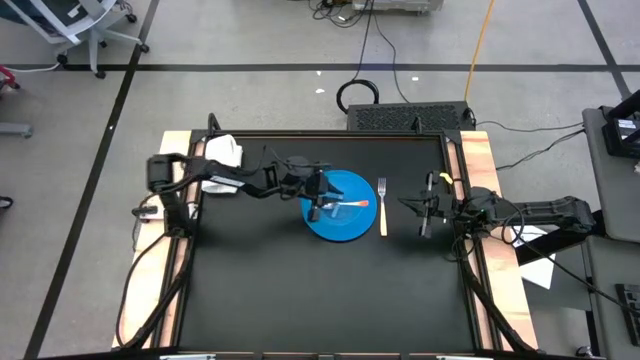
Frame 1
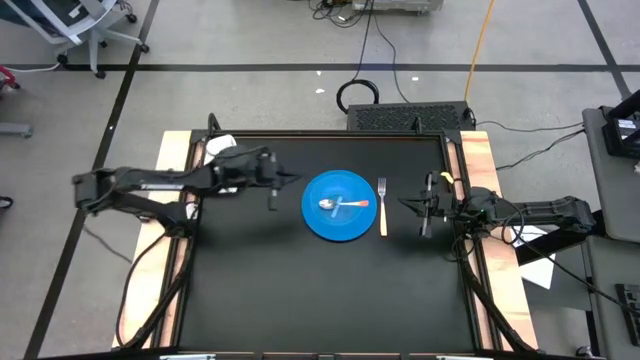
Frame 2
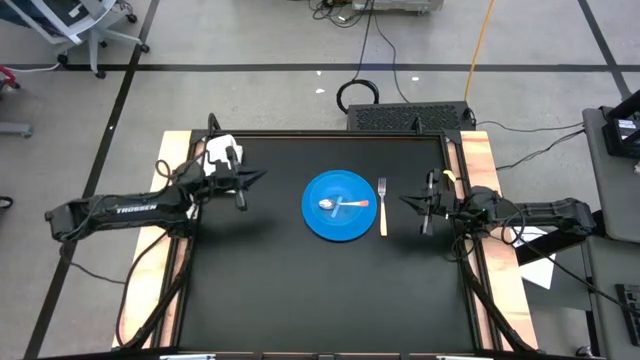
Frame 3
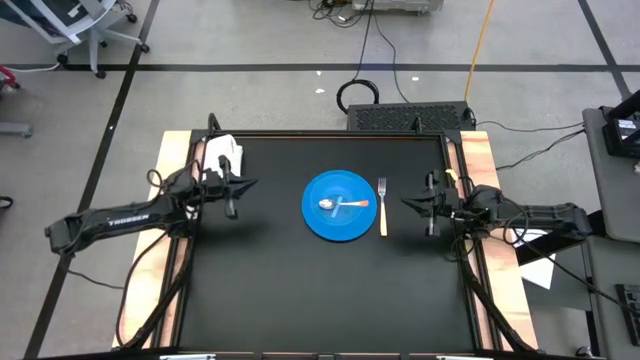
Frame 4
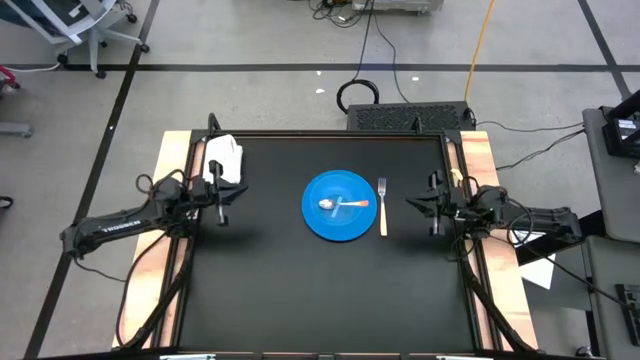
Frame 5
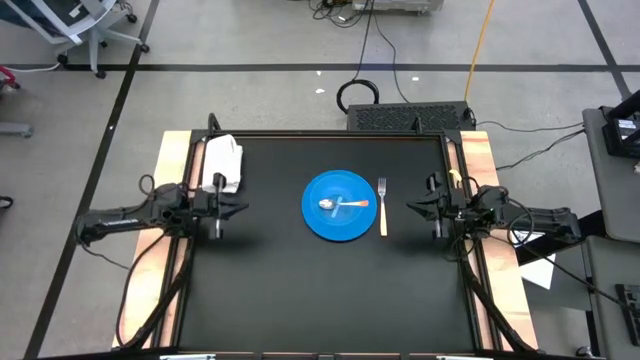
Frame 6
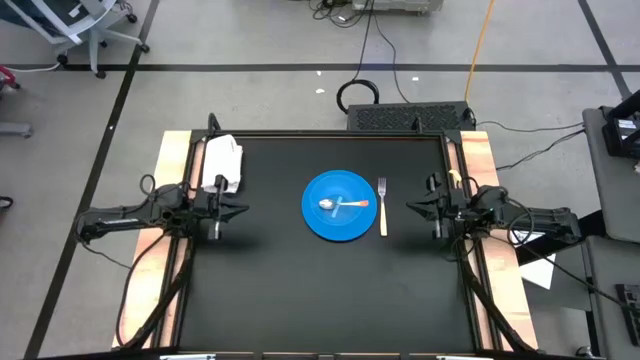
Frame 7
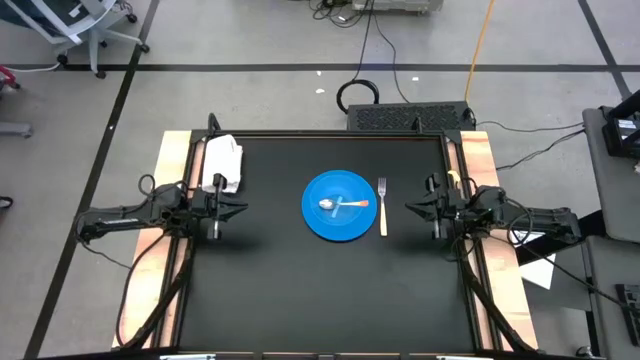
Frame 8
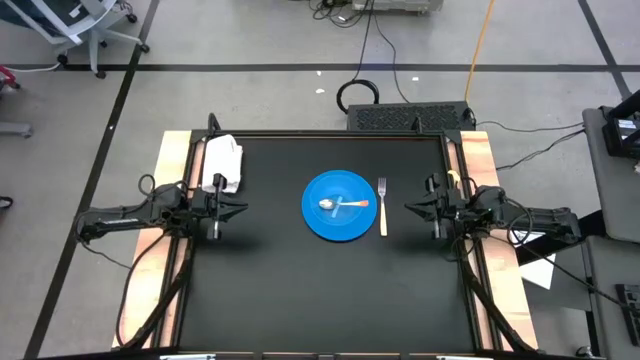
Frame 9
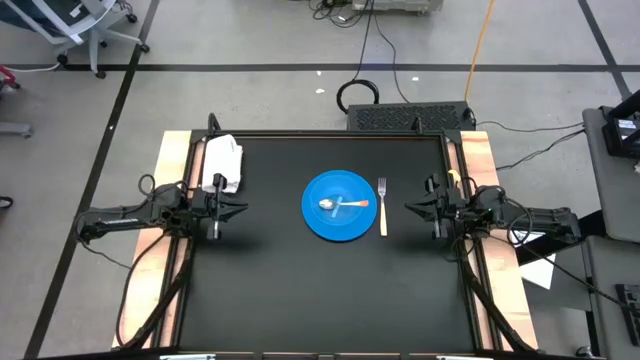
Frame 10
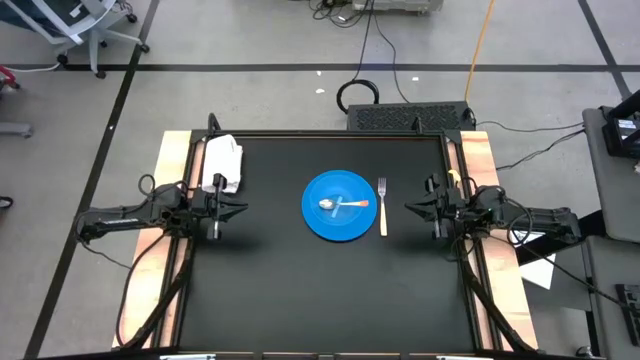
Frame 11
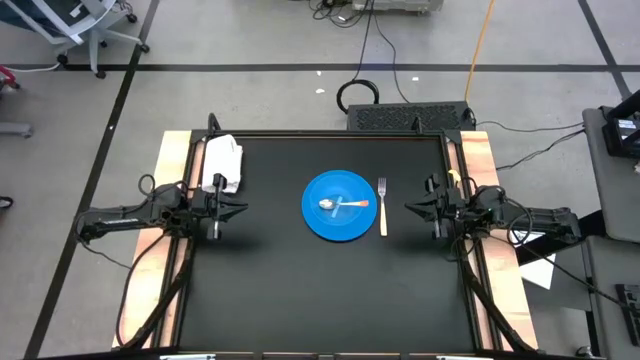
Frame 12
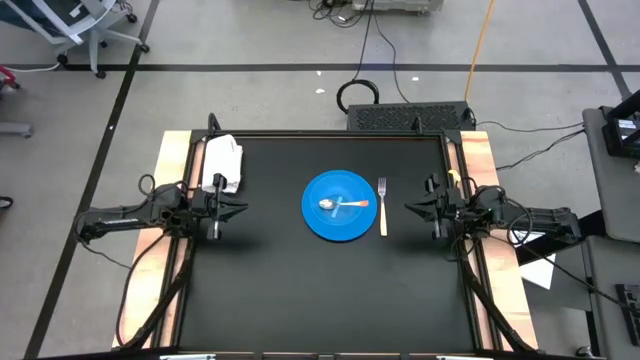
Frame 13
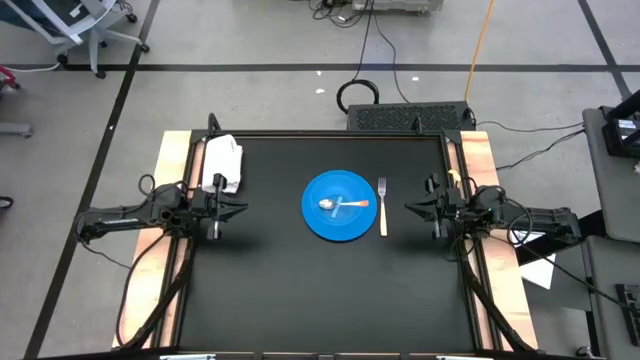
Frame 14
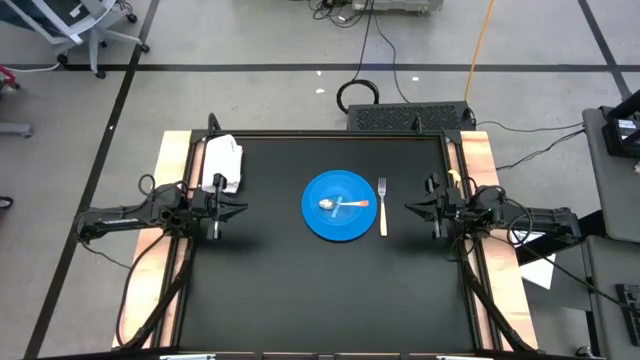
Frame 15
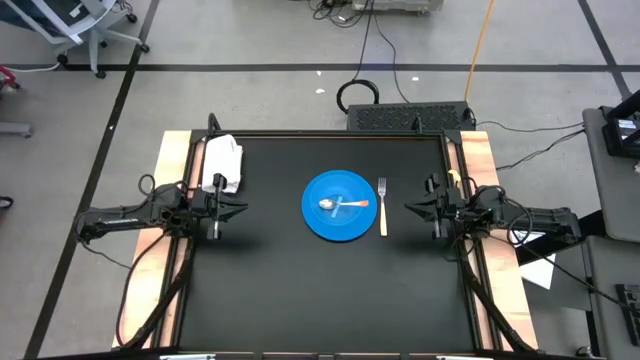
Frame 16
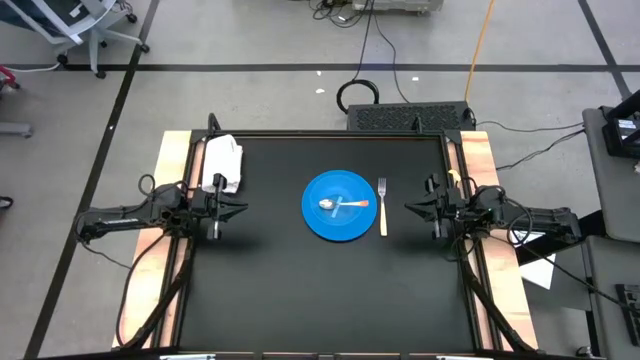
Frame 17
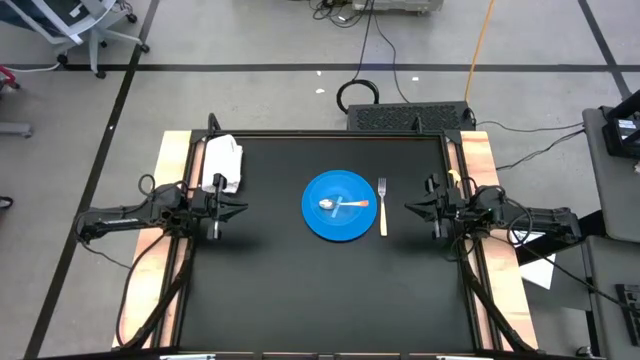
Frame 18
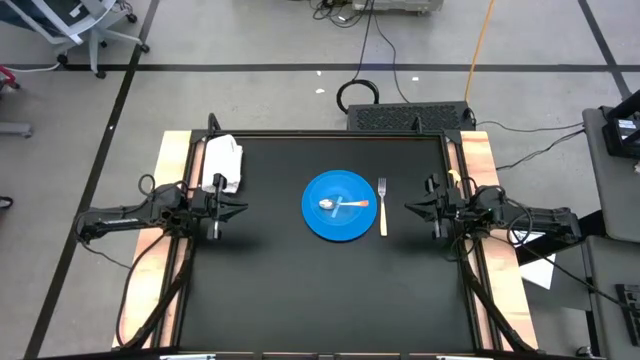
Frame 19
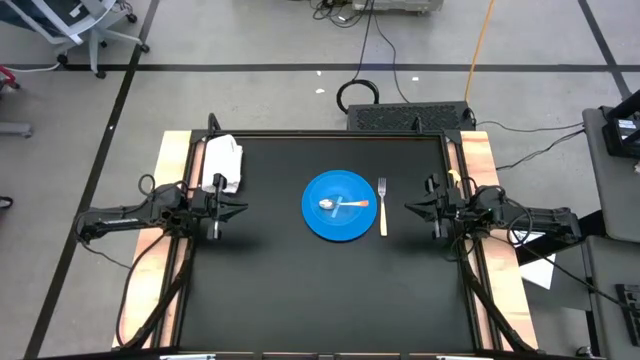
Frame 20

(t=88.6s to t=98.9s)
Task: Set table place
Return to Home Position

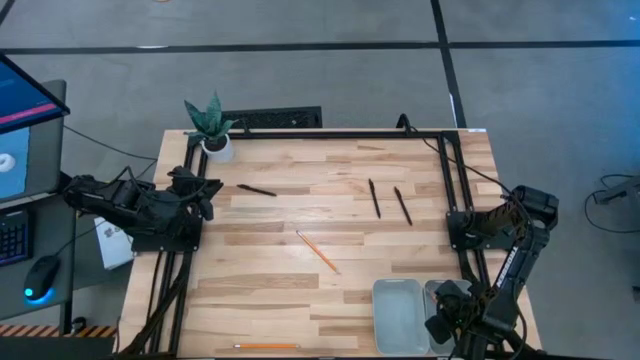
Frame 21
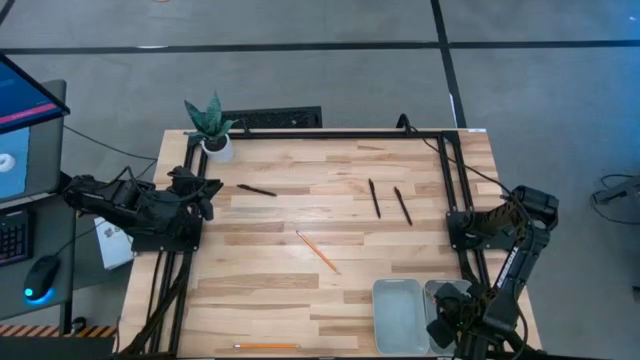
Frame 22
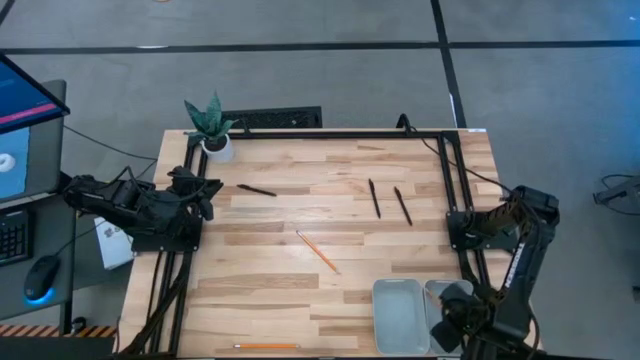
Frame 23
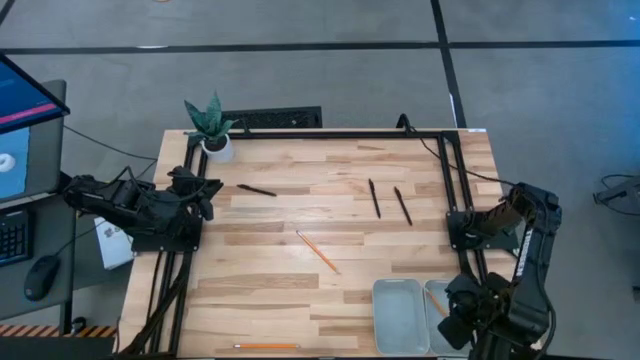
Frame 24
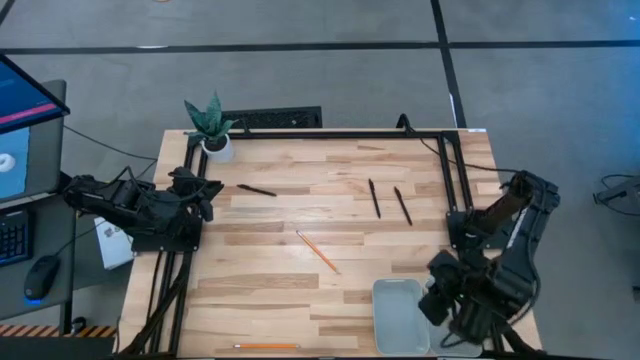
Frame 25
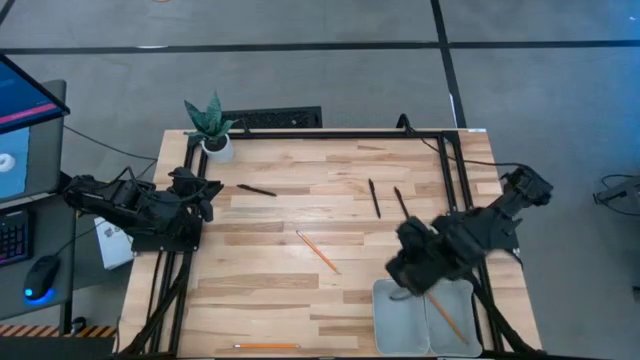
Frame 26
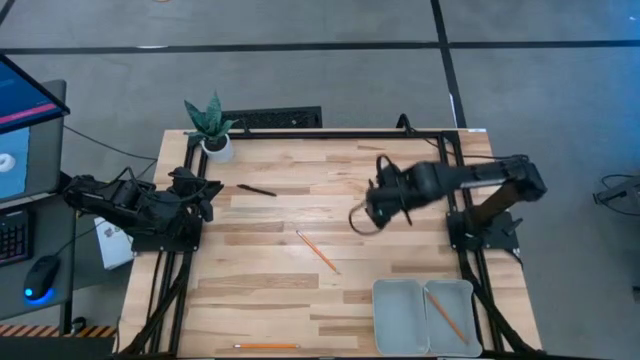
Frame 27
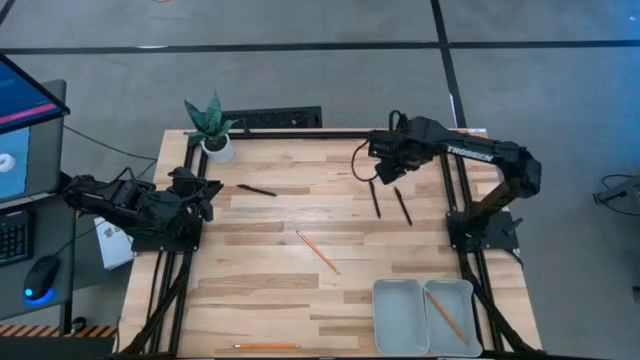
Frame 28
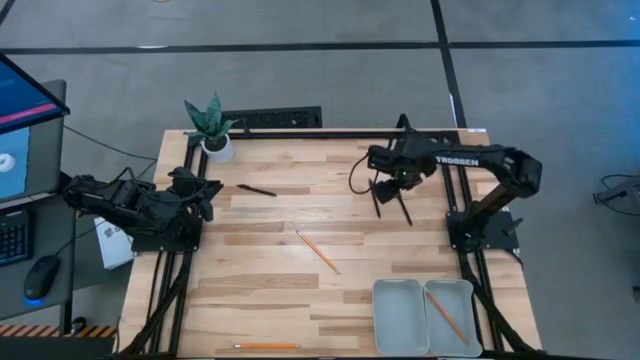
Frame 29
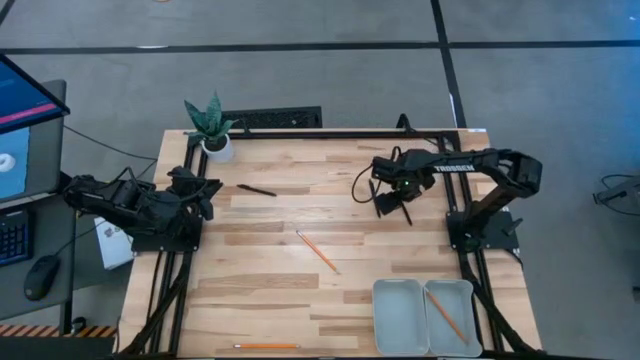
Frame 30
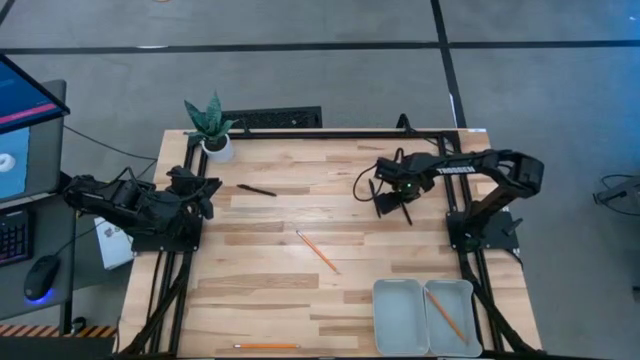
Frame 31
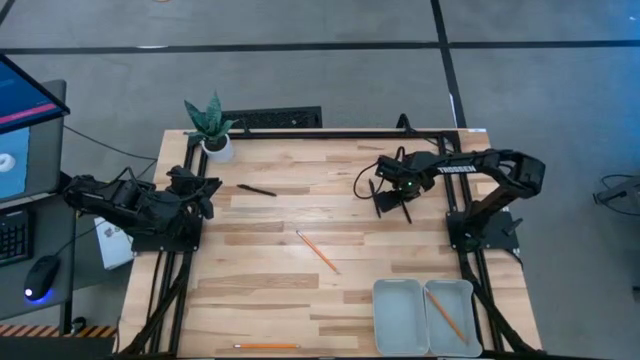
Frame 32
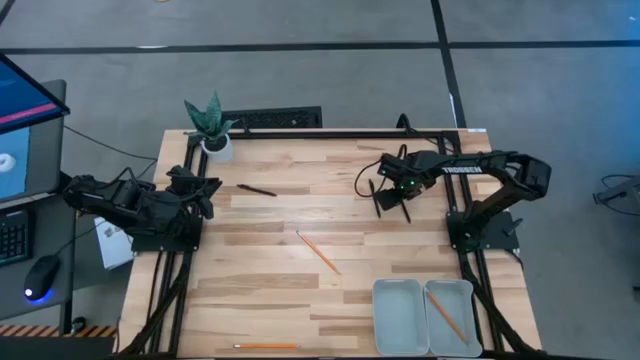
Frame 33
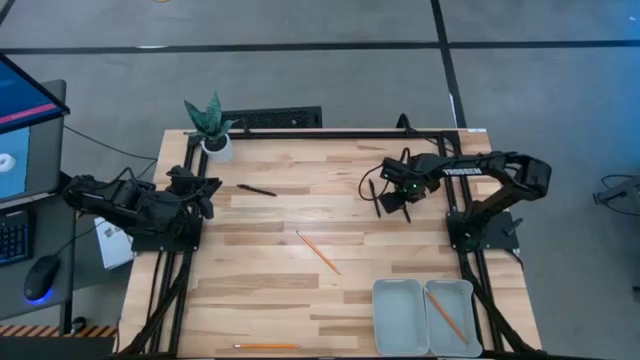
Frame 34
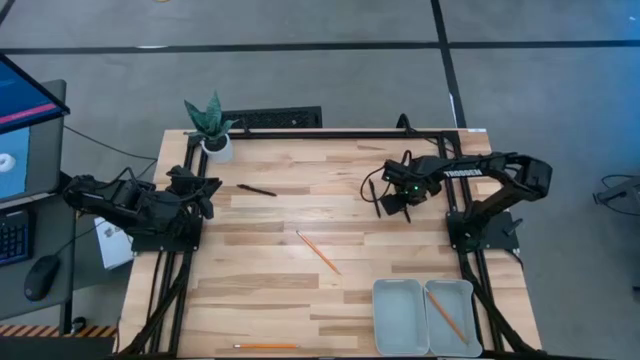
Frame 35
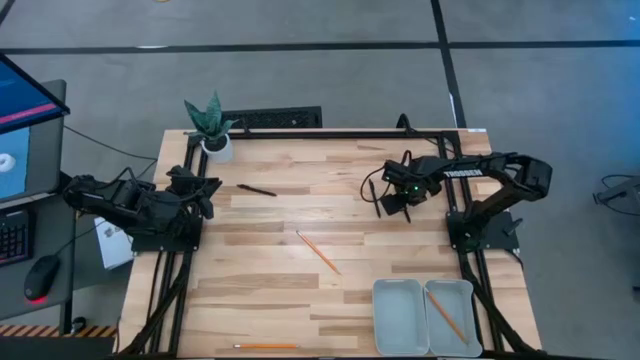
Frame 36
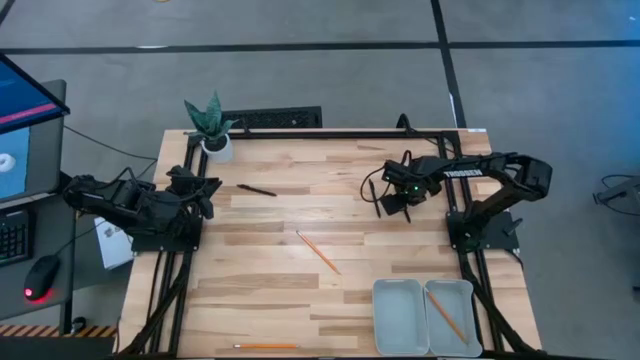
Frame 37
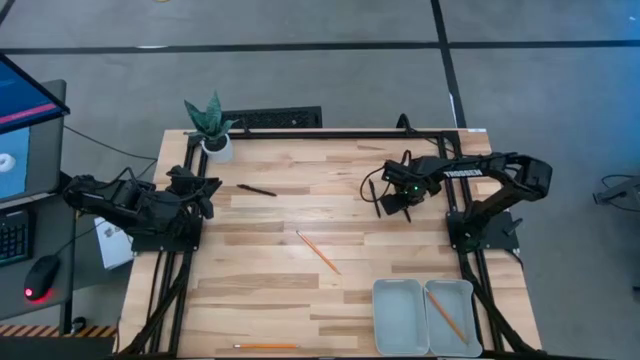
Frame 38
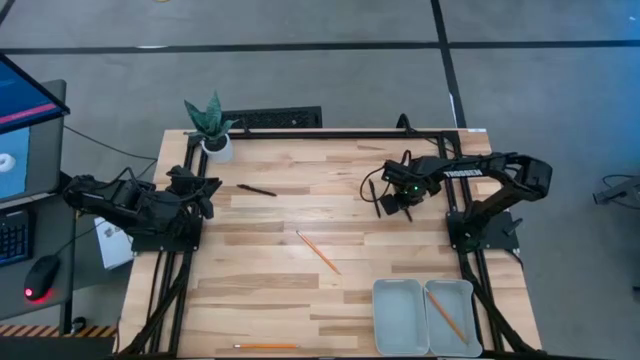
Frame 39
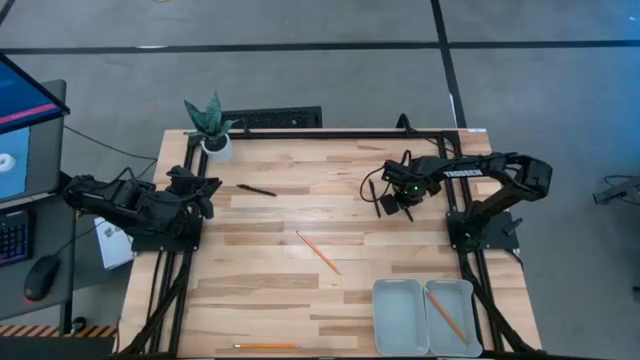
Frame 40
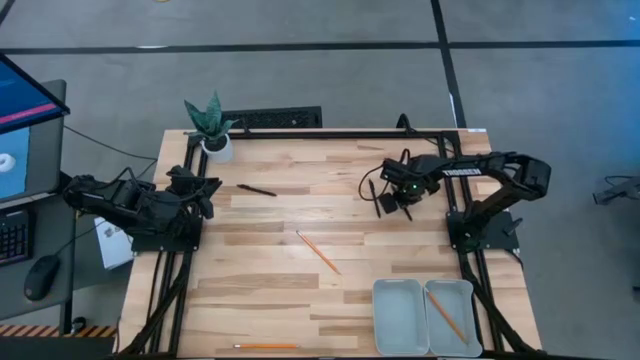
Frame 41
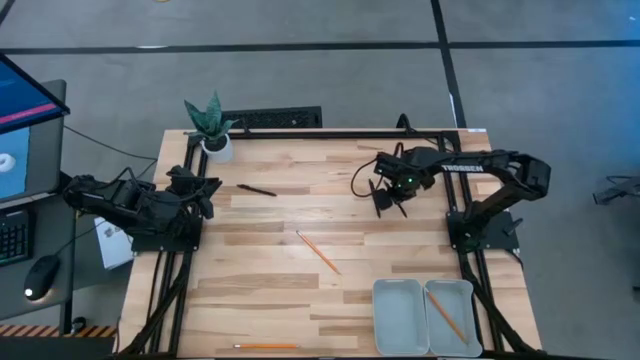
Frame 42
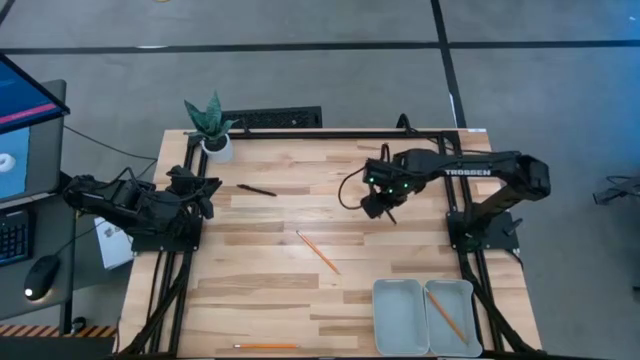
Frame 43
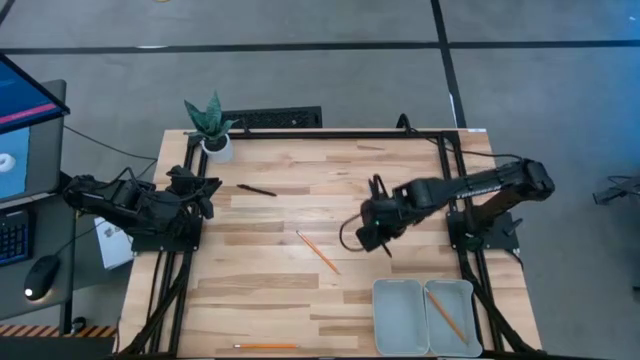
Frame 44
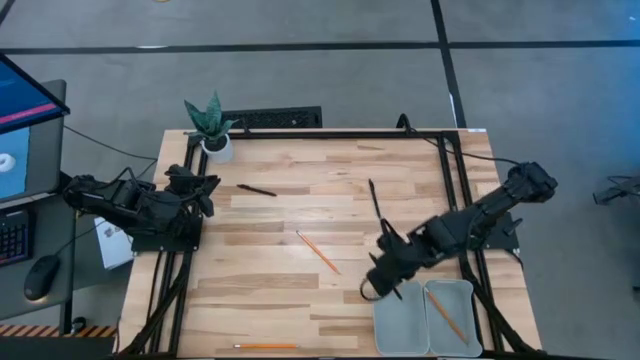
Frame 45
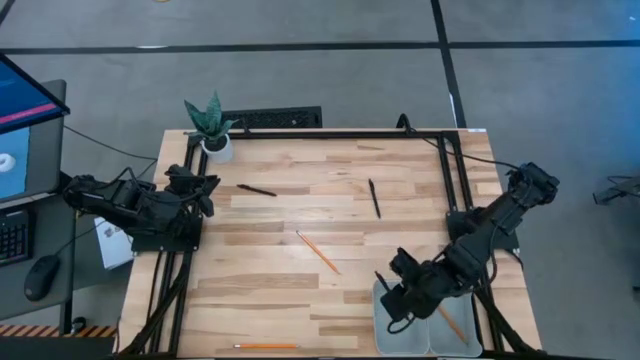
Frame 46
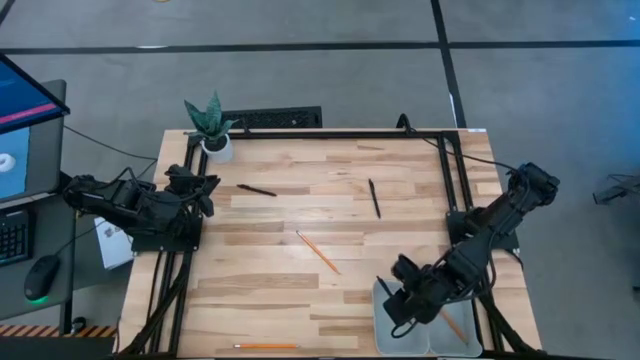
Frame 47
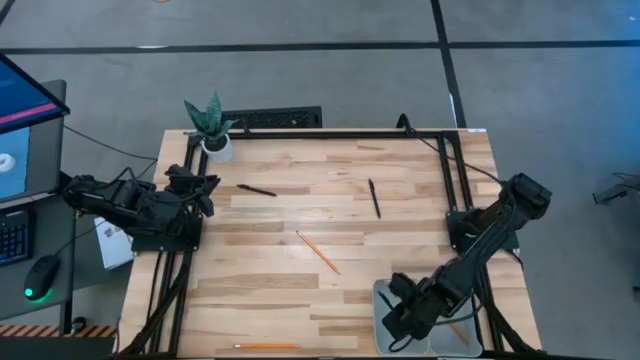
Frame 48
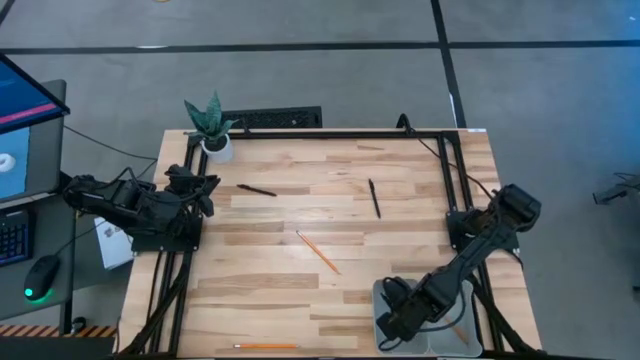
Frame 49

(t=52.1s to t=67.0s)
Task: Sort pens & pencils
Put the top right black pen into the bottom left gray bin
